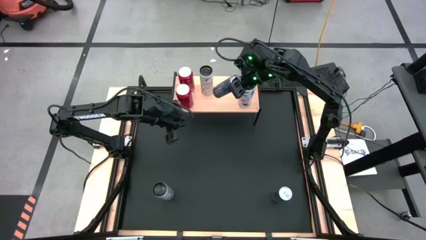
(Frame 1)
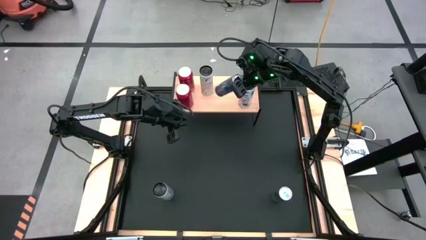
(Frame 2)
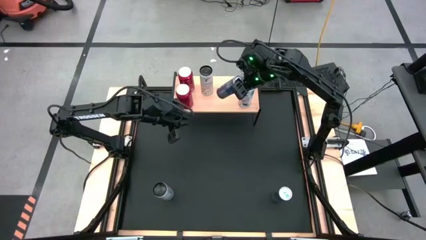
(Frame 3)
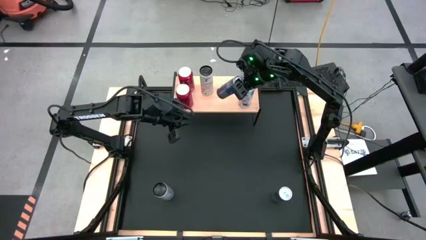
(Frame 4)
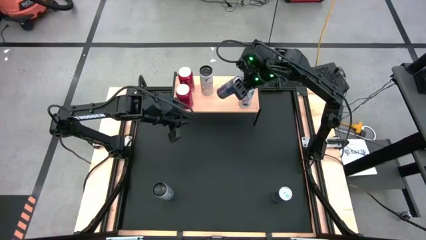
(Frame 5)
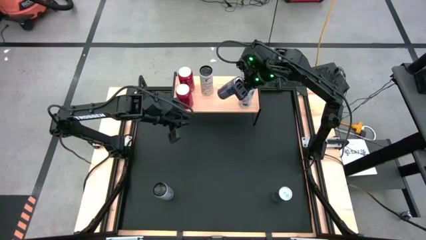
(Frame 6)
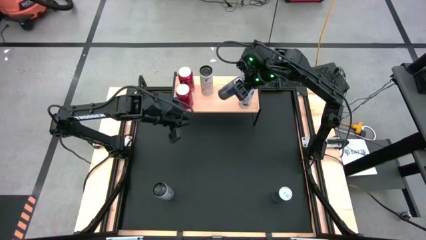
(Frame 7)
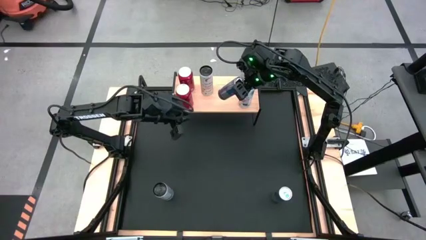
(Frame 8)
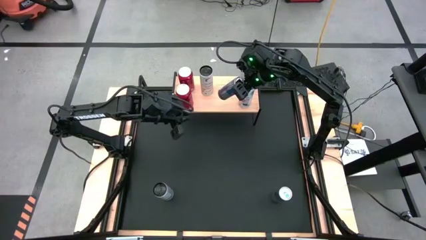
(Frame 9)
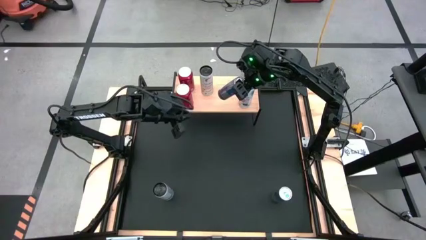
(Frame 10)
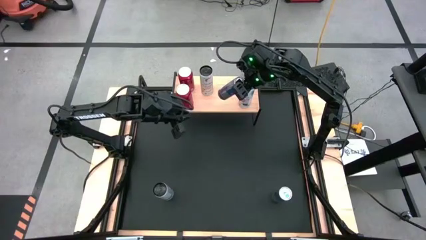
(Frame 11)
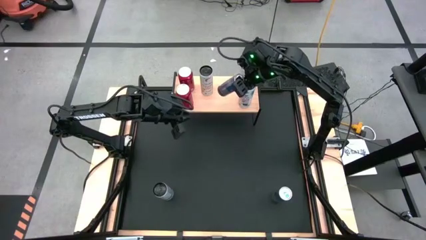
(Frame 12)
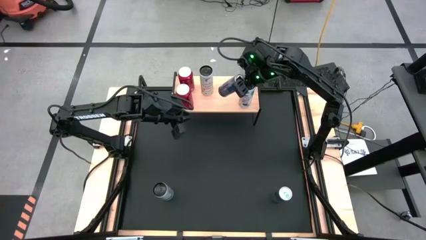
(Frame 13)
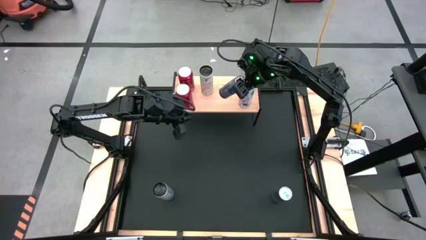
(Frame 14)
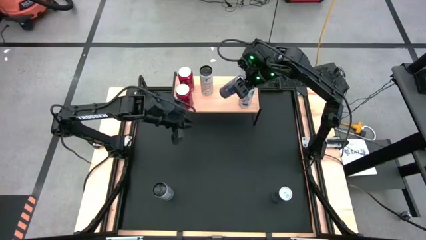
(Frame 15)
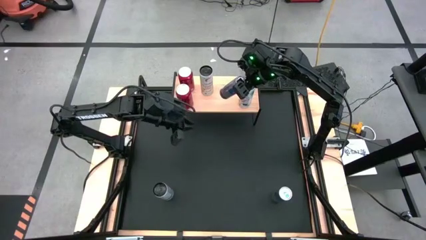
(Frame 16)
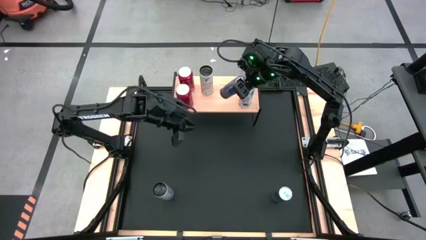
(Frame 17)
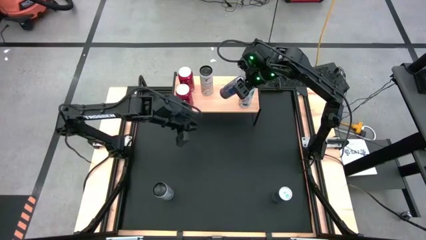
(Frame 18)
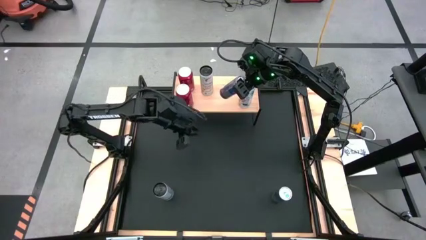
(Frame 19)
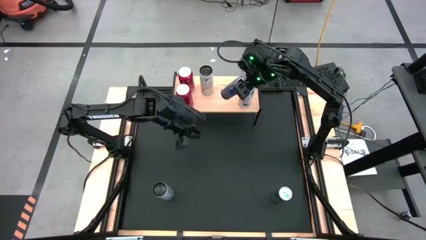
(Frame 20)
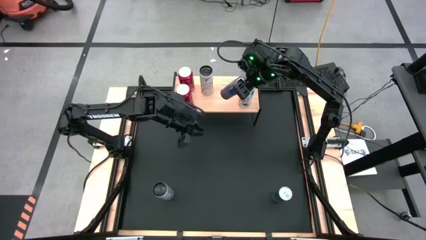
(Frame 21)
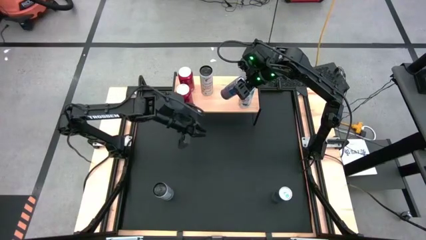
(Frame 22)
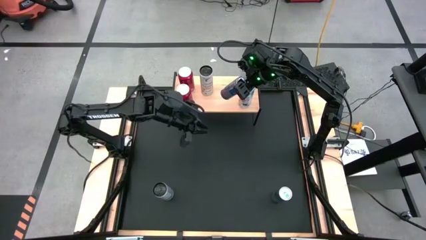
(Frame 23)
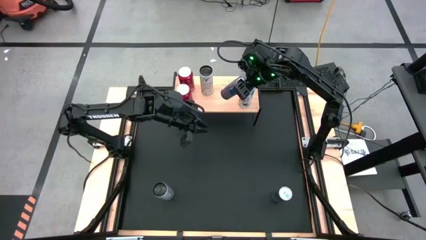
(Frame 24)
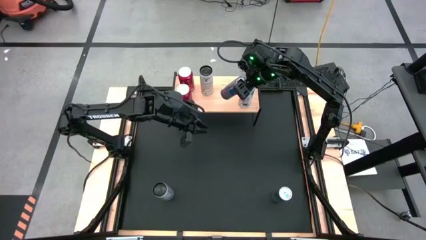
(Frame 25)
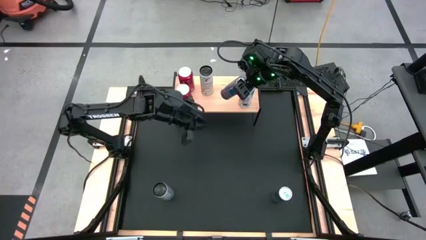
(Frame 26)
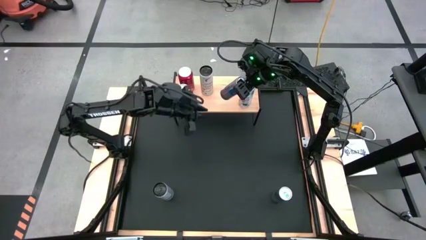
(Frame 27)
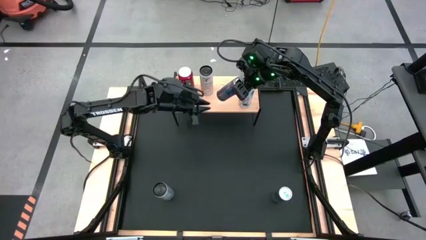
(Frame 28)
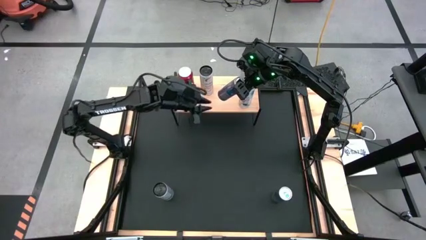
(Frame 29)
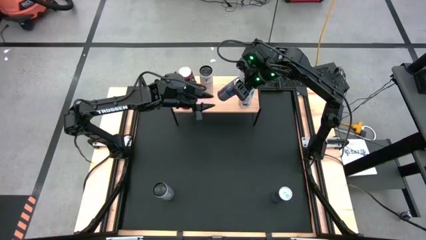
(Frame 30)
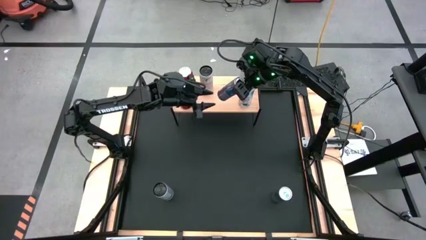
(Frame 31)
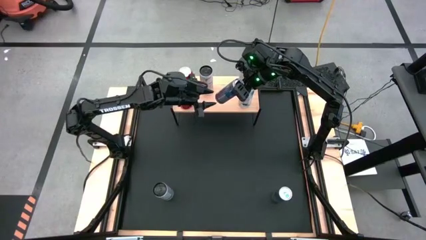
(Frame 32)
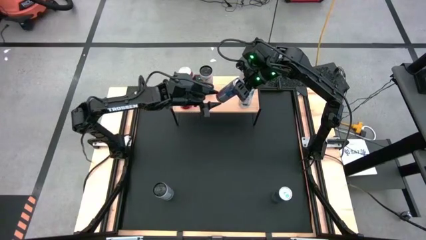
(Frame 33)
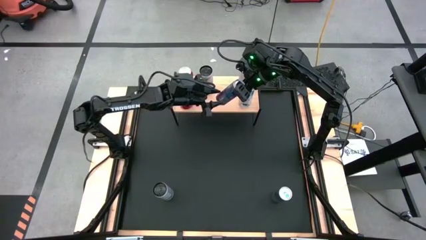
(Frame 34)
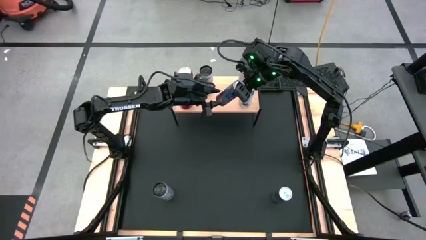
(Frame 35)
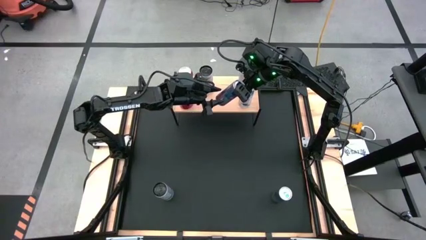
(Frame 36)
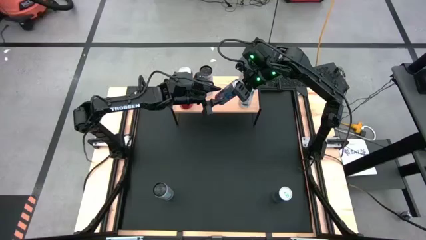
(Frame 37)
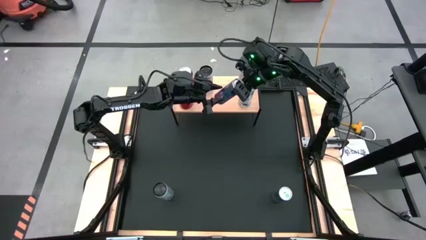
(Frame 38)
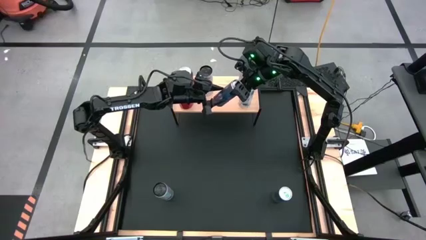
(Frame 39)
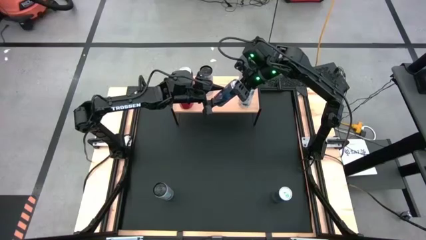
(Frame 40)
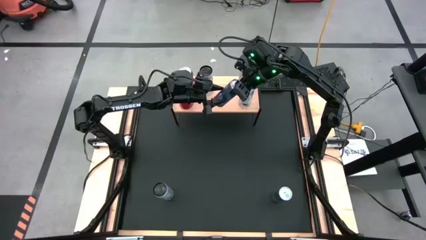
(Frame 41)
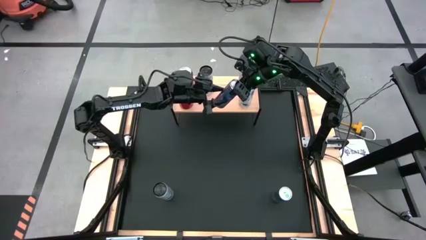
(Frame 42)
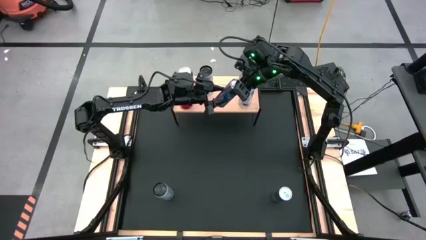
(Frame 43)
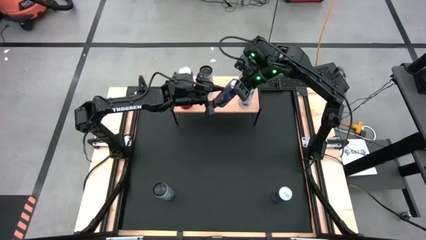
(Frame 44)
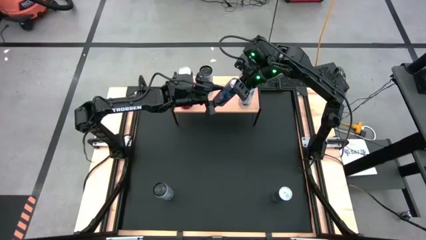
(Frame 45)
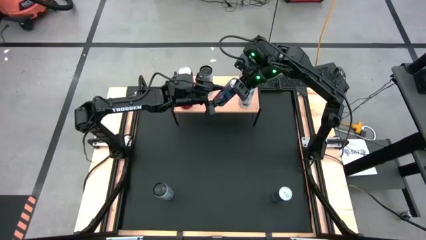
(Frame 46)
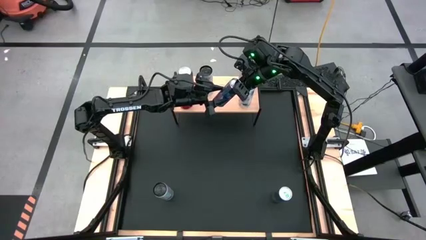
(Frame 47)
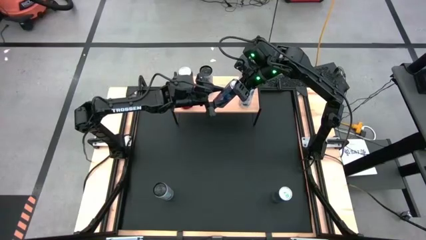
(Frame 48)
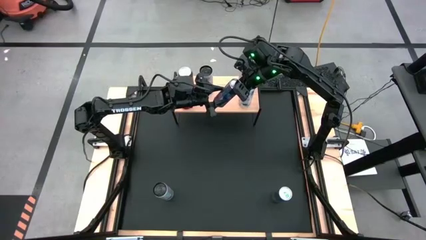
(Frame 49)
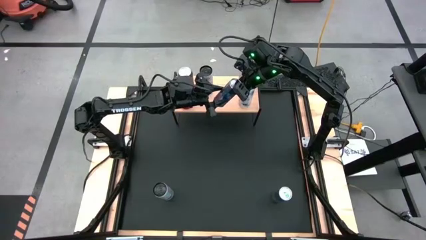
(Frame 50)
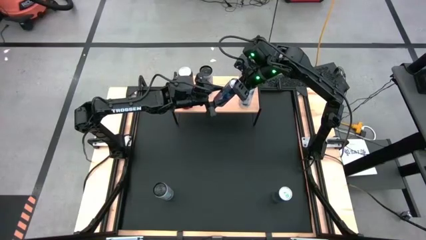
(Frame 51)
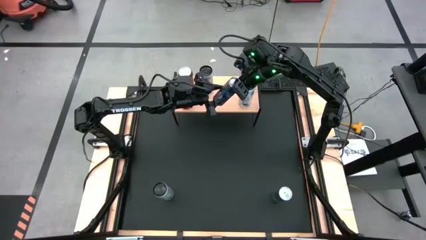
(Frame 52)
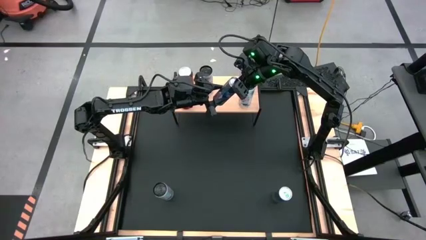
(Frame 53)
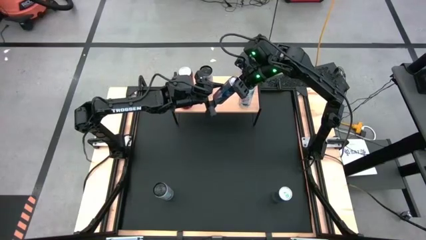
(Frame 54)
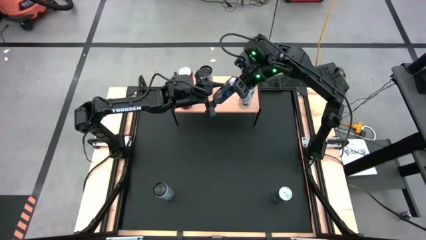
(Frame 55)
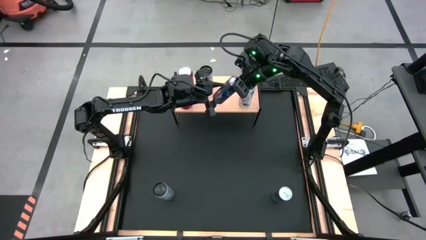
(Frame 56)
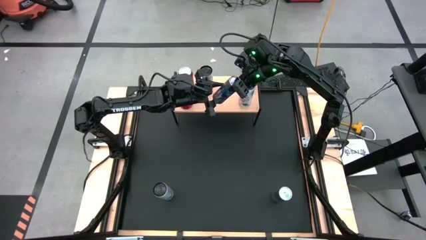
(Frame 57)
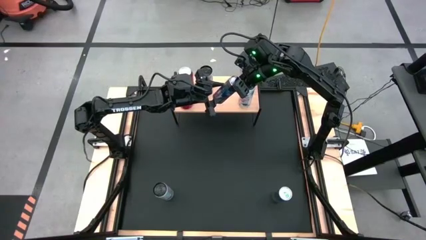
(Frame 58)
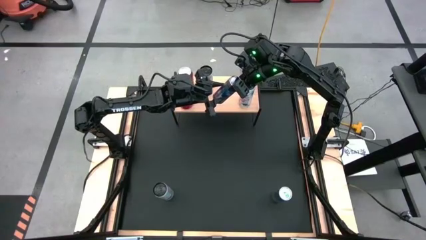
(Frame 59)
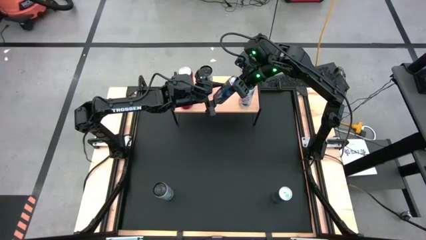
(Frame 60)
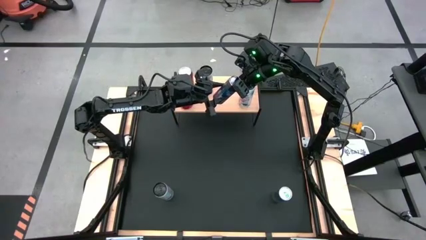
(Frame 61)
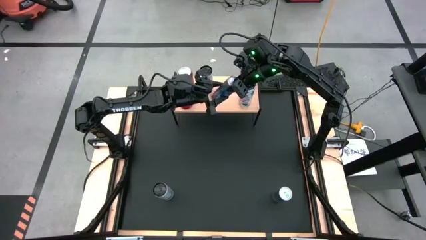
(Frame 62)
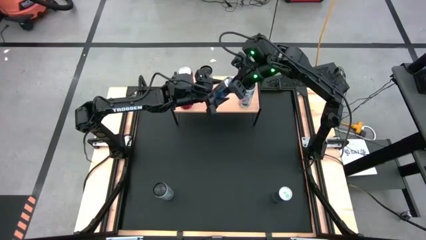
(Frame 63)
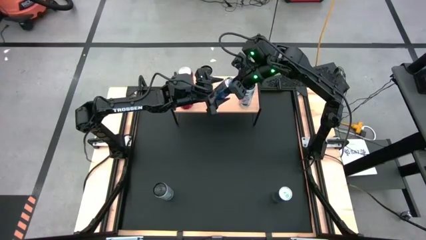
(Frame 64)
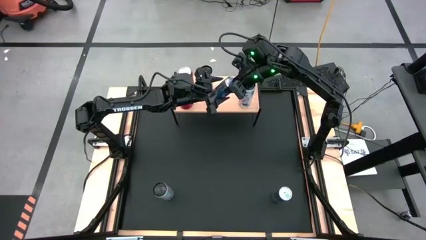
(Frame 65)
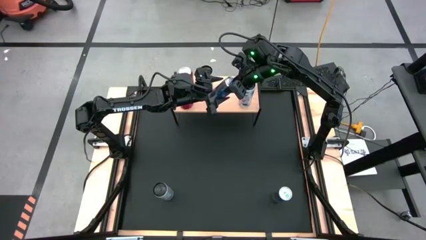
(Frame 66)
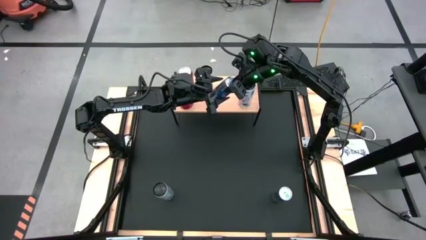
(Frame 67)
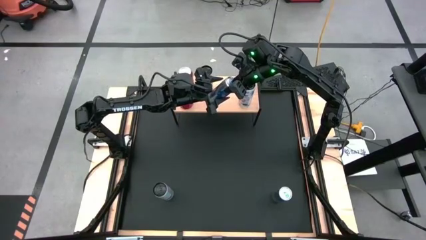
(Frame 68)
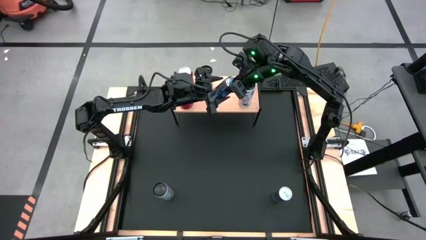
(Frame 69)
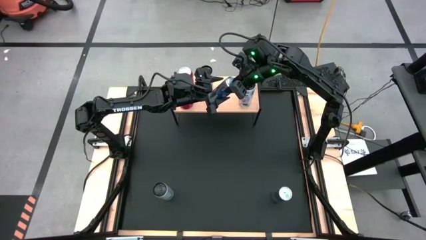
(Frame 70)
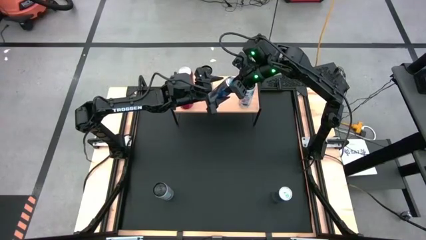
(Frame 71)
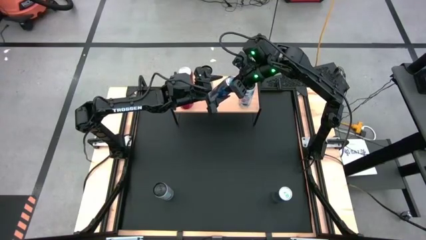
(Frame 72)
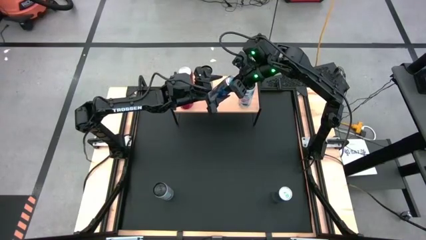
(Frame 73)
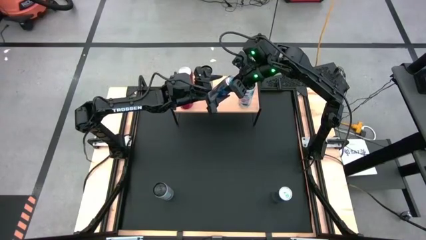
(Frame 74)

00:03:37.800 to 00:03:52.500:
Task: Place canned beverage on shelf
Put the top blue soda can on the shelf
